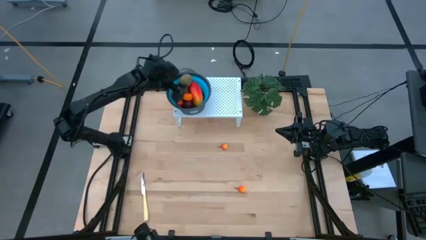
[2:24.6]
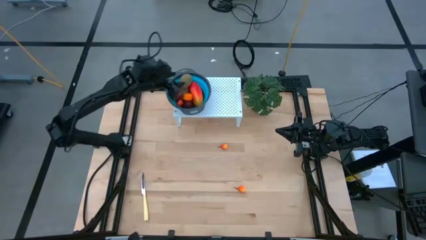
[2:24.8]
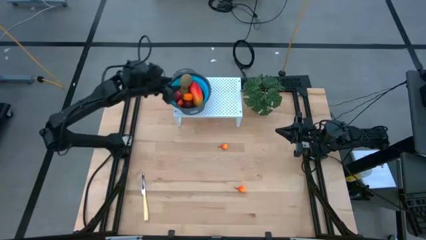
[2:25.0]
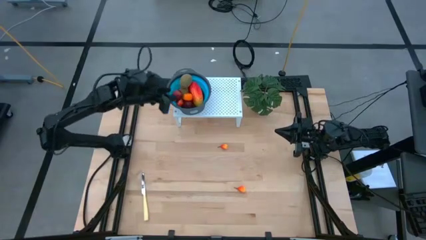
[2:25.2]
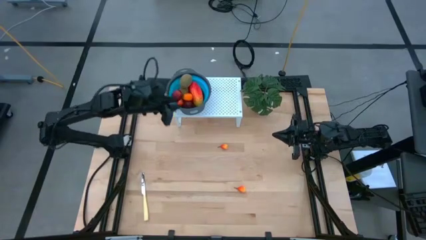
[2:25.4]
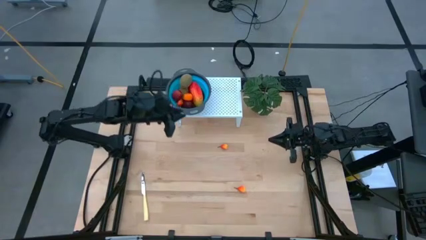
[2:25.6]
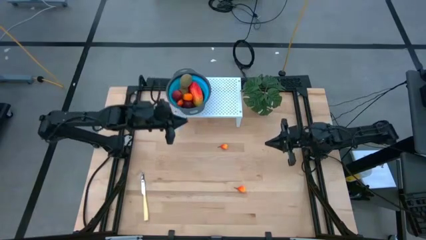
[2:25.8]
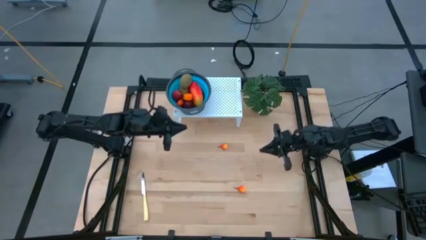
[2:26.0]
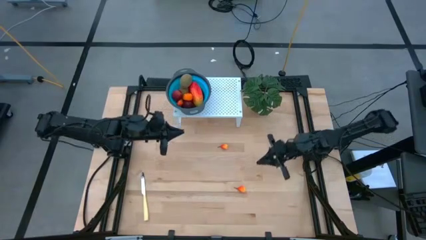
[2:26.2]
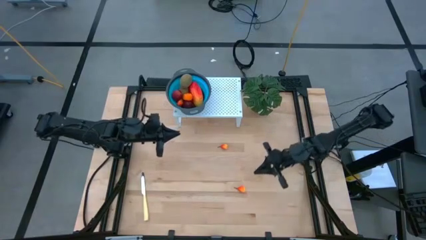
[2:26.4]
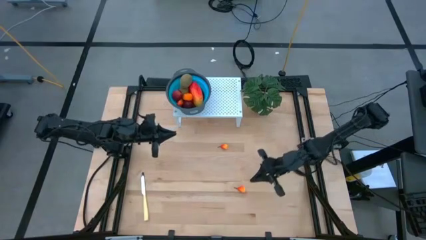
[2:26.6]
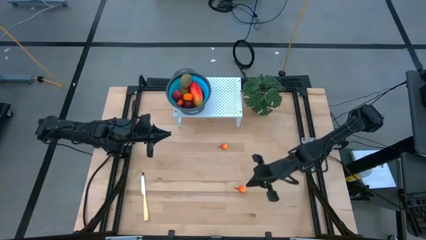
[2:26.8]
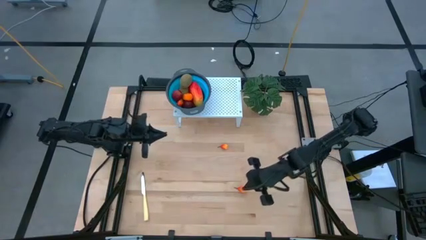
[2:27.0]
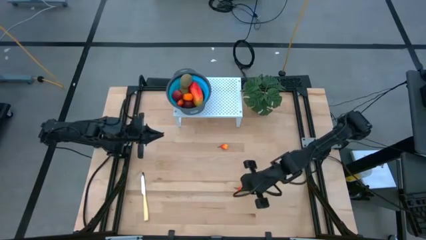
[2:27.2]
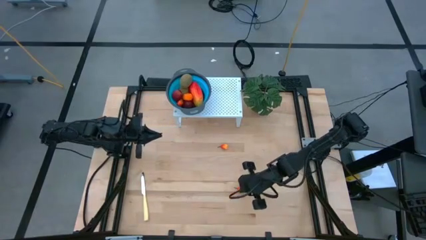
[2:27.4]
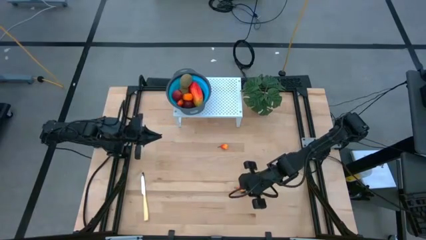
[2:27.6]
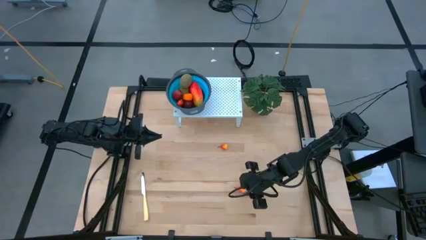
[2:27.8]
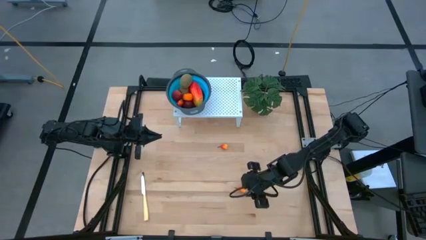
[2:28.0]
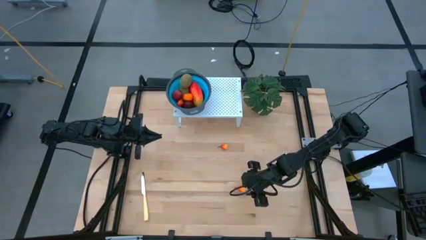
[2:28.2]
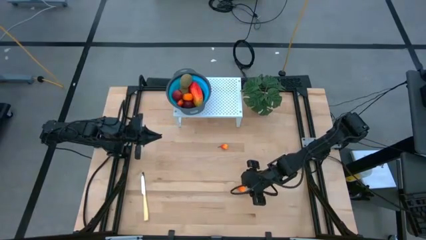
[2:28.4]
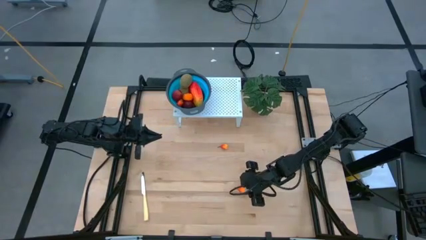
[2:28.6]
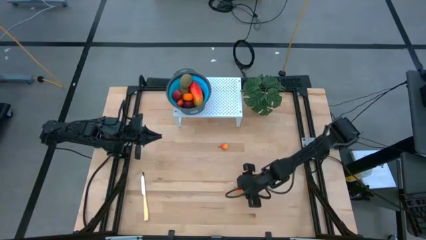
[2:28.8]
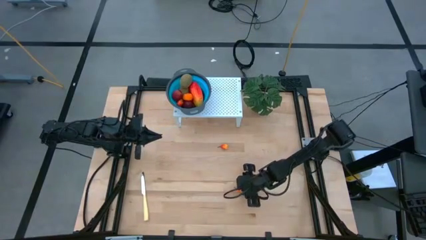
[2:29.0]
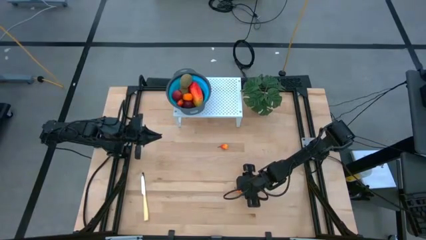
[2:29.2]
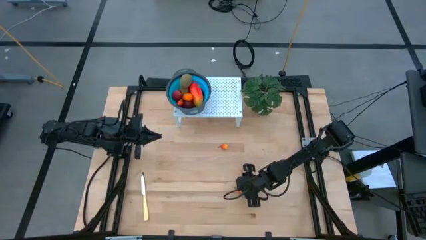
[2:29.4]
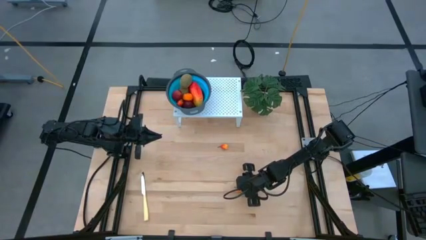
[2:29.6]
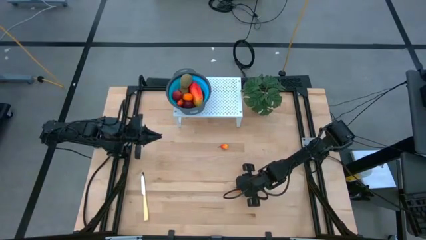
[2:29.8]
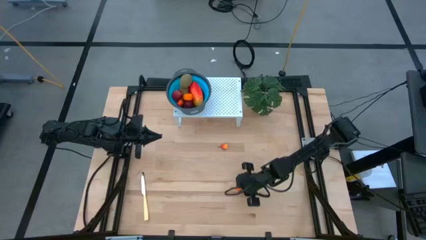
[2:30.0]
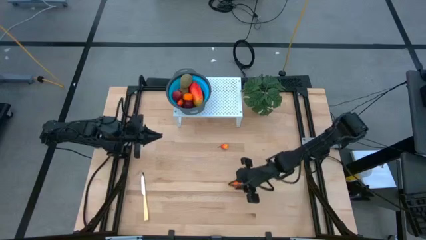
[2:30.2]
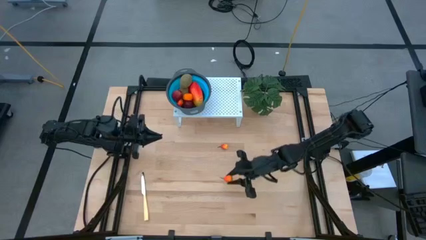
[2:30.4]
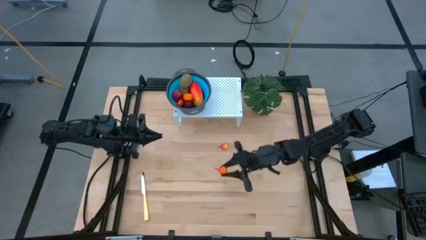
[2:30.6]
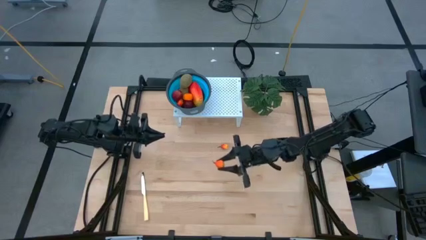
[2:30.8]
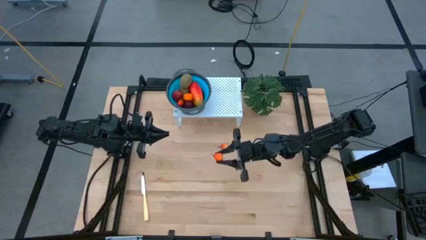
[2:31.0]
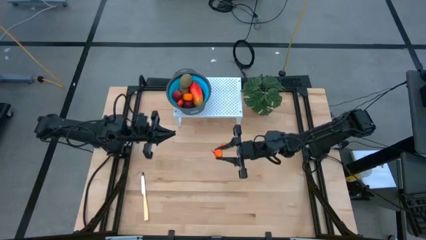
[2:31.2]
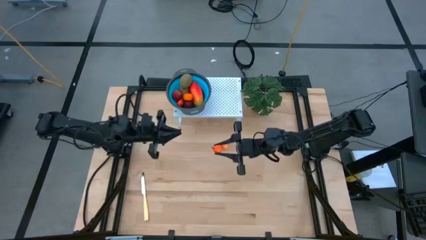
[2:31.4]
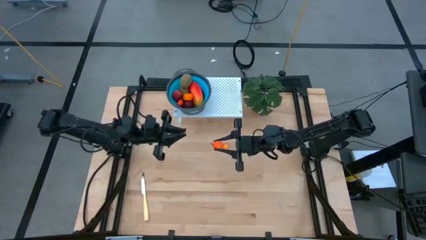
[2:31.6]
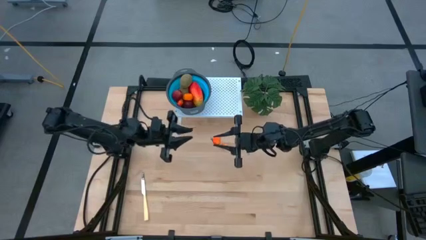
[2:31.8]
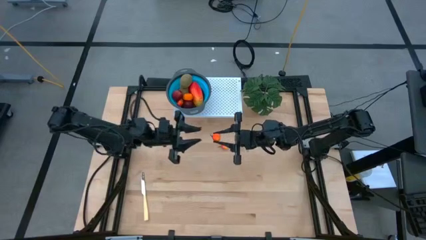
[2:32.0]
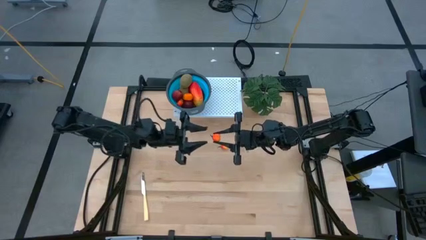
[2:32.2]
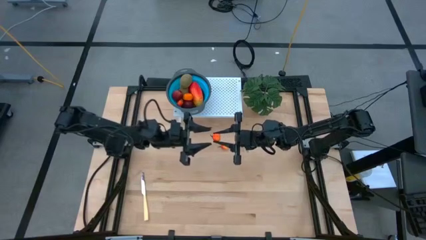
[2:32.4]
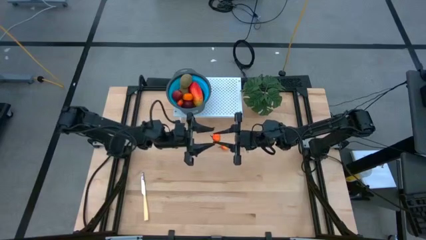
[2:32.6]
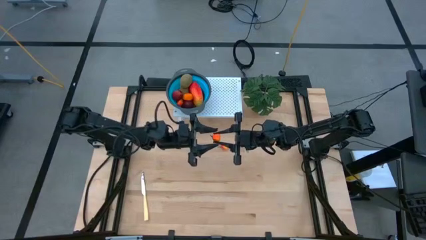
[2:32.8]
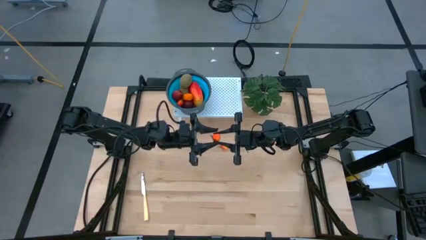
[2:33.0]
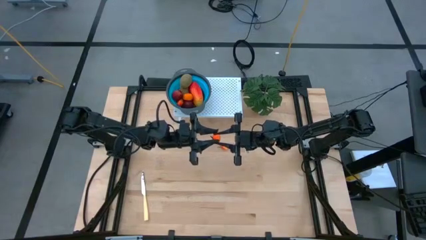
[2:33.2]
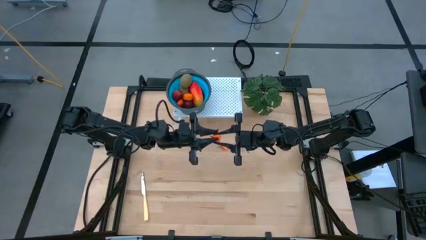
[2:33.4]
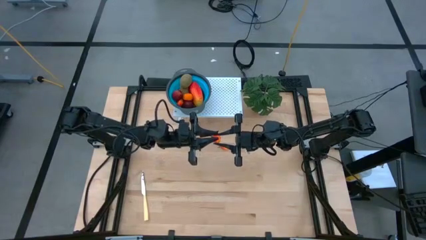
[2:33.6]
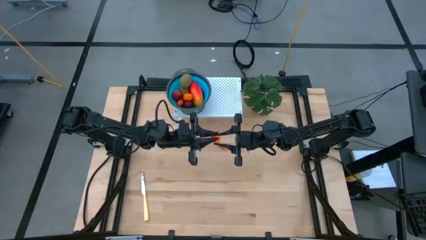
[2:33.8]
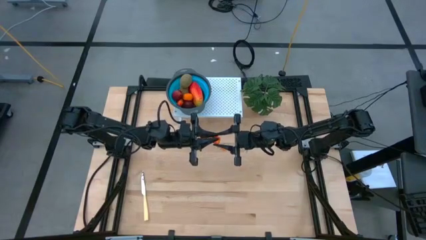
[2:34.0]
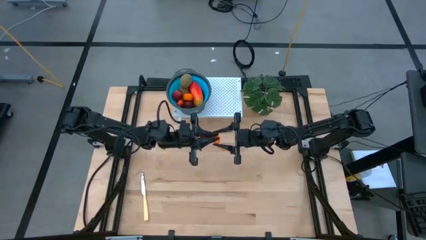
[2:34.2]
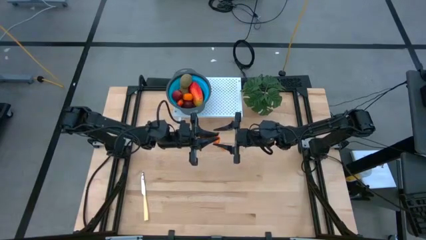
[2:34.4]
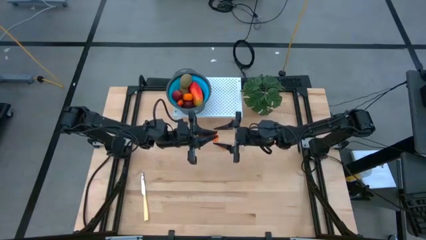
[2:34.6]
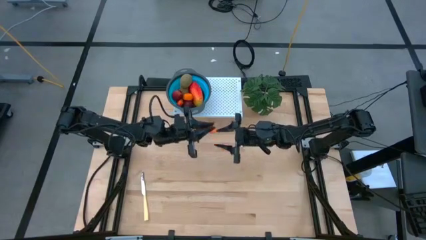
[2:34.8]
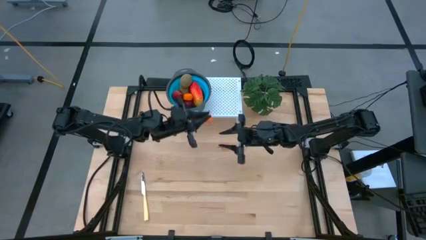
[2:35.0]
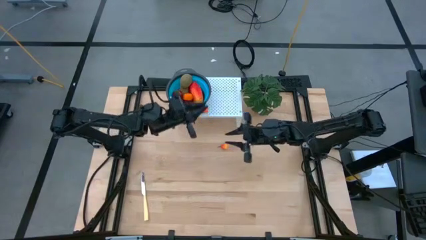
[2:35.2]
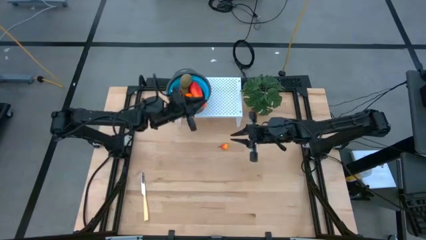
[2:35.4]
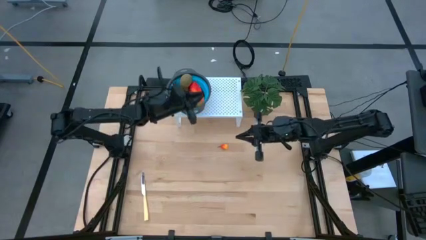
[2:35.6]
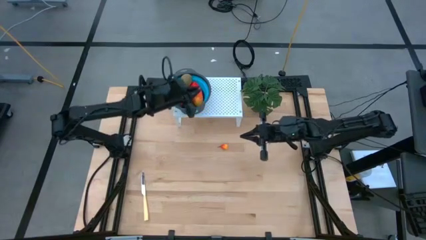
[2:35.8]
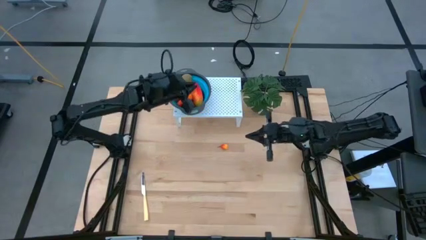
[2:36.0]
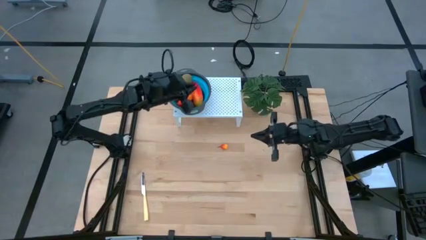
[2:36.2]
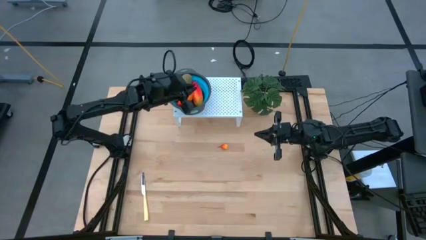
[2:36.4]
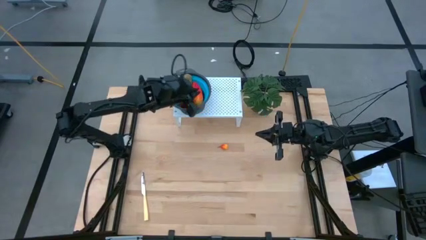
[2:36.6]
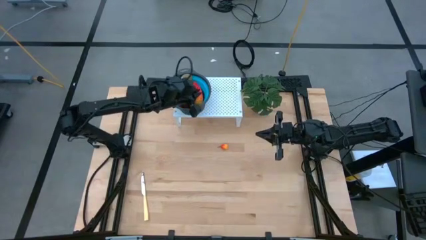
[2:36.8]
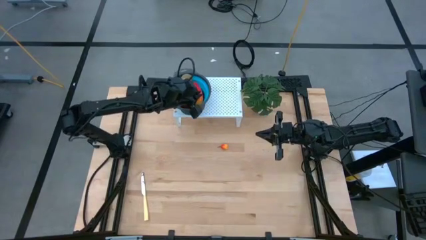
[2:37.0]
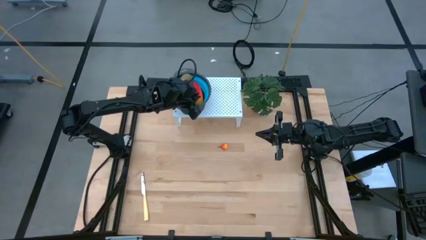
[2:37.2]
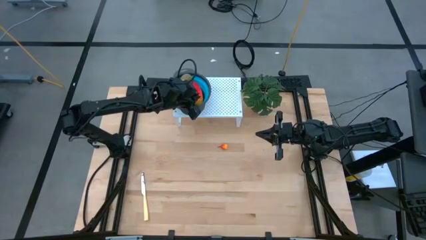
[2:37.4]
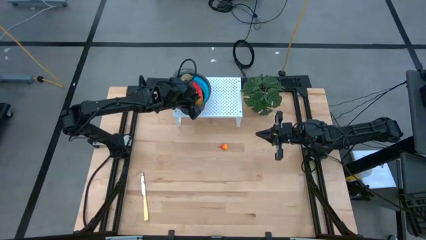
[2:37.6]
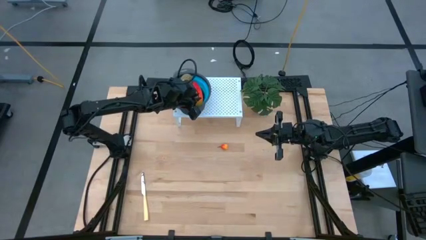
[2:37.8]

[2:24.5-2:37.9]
Task: Pick & Place Fruit
Put the peach in the blue strainer bowl on the shelf

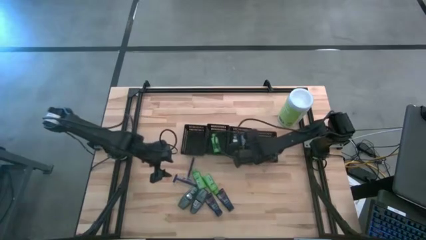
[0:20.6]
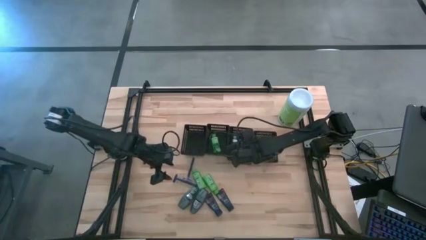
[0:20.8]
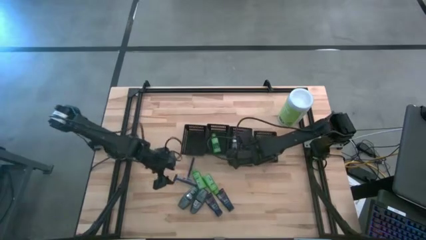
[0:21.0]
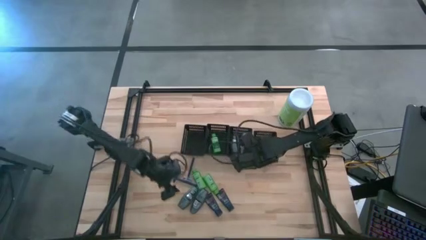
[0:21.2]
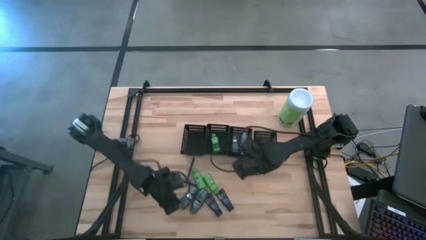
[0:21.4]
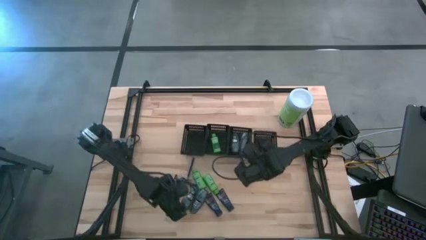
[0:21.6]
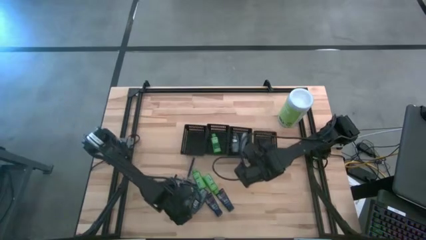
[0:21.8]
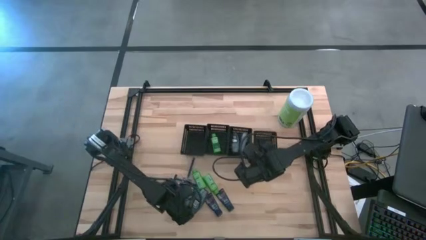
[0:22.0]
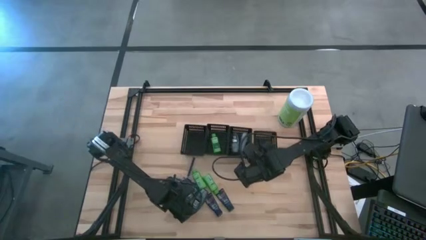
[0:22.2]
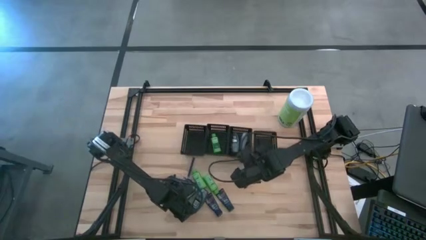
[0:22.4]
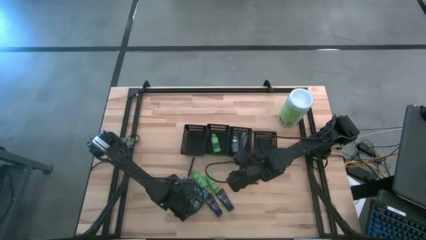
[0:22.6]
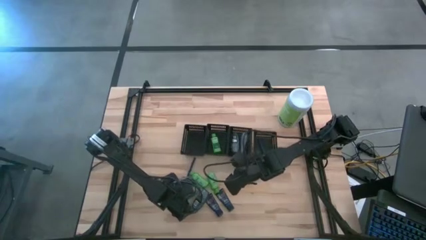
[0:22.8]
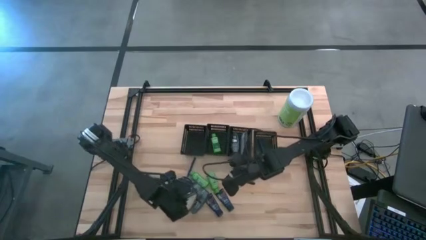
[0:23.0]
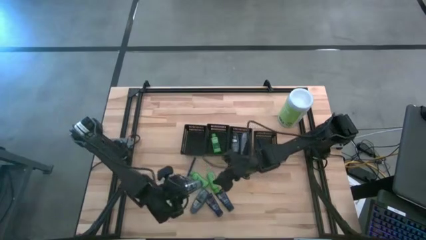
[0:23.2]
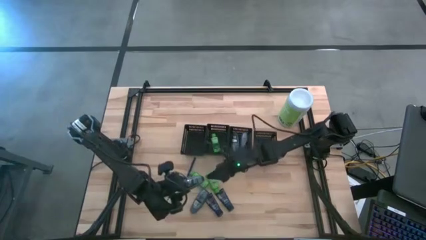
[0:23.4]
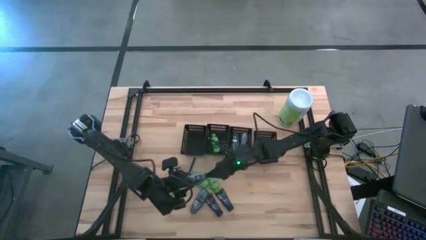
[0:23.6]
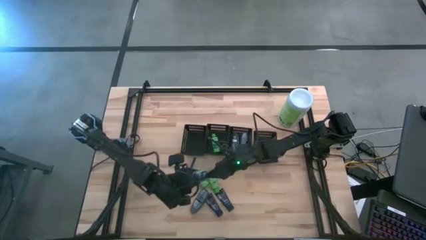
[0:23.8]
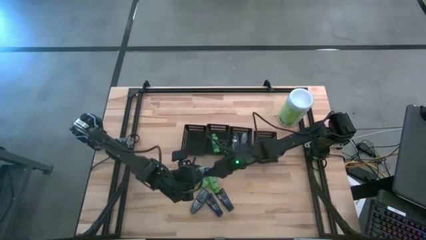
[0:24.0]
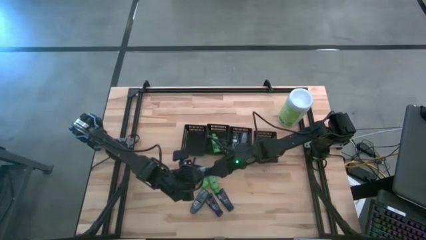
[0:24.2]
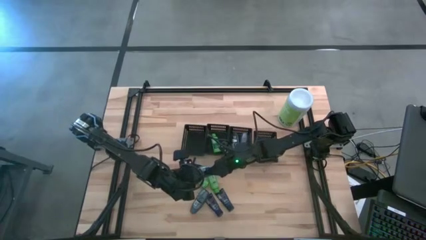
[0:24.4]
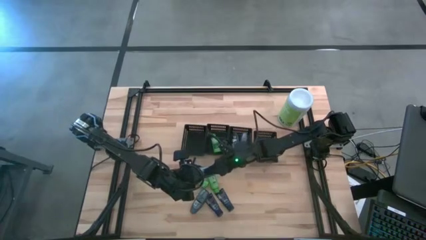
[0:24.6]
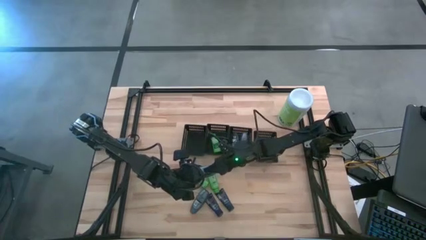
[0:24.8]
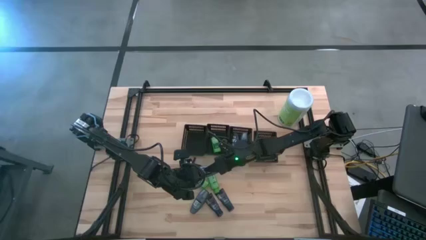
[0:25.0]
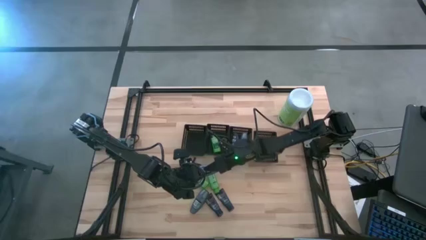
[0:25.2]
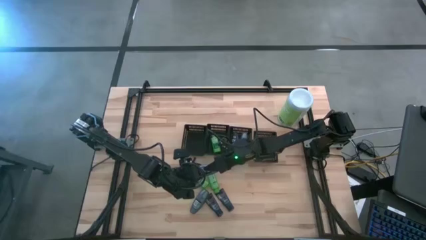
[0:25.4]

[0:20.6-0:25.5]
Task: Pick & Place Travel size toiletries
Put the deodorant into the middle right black bin
